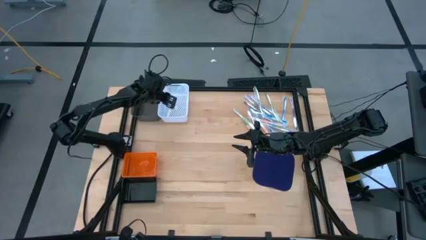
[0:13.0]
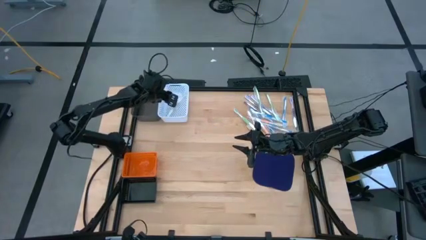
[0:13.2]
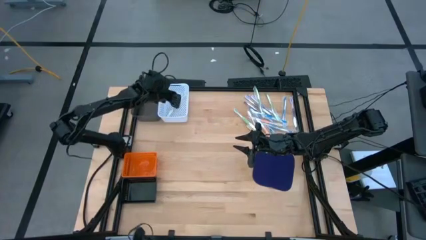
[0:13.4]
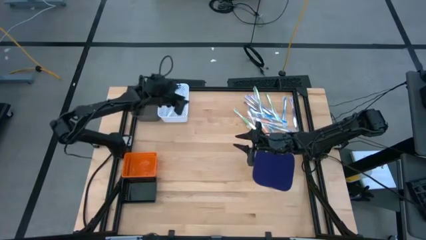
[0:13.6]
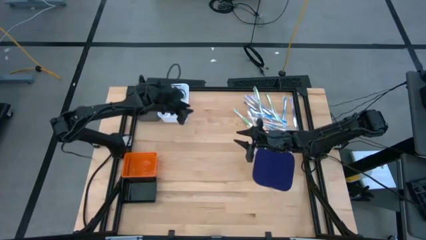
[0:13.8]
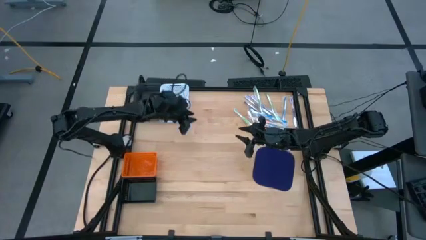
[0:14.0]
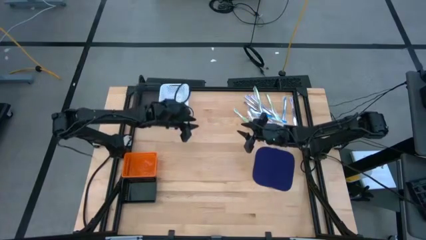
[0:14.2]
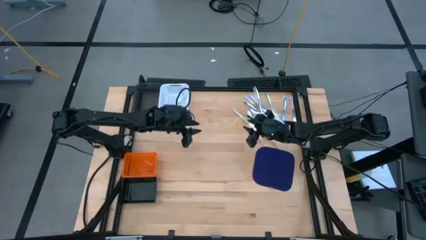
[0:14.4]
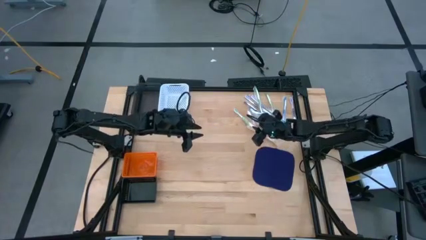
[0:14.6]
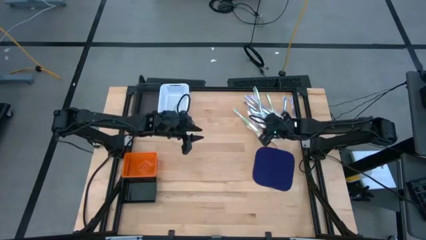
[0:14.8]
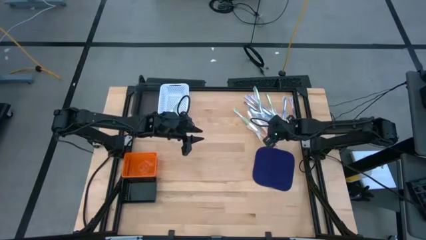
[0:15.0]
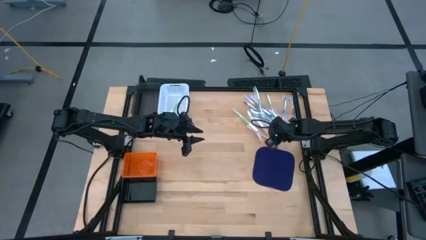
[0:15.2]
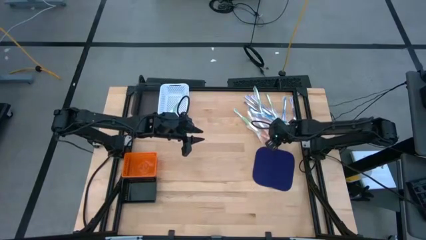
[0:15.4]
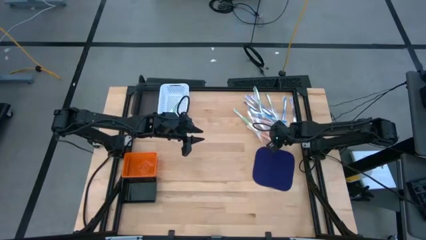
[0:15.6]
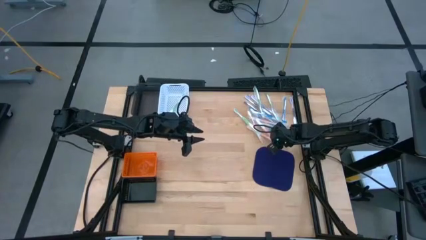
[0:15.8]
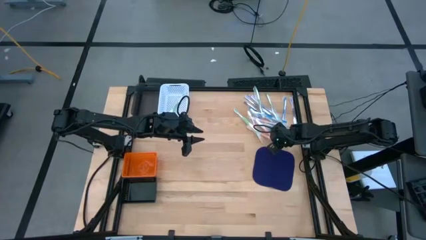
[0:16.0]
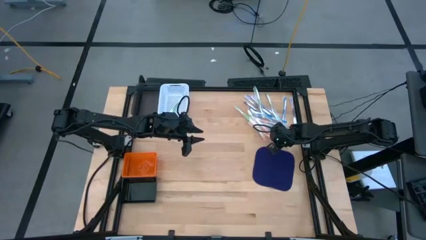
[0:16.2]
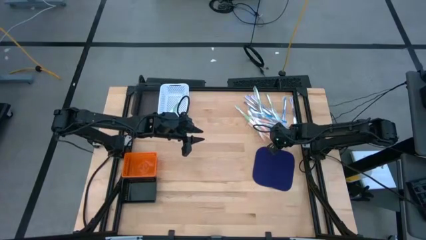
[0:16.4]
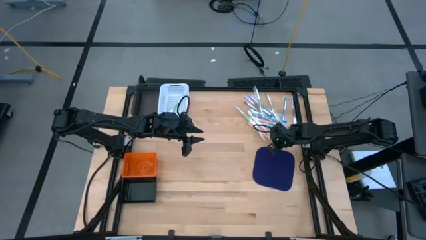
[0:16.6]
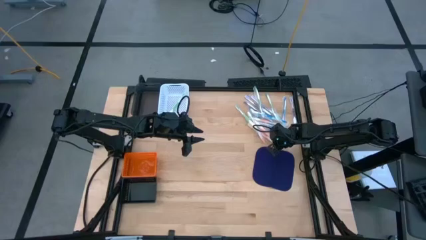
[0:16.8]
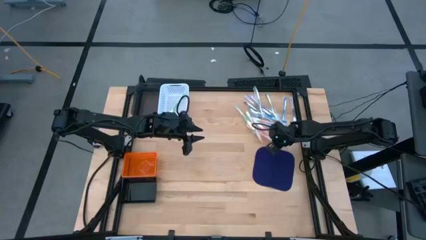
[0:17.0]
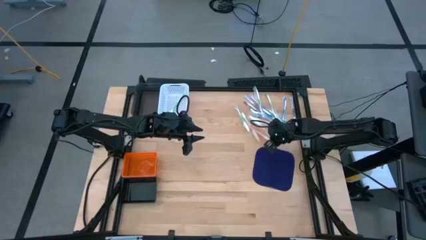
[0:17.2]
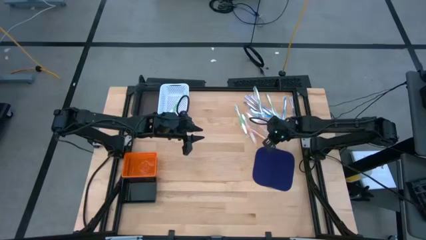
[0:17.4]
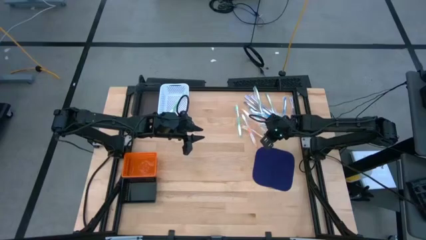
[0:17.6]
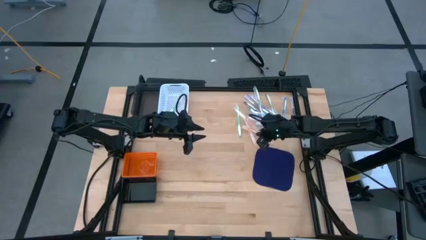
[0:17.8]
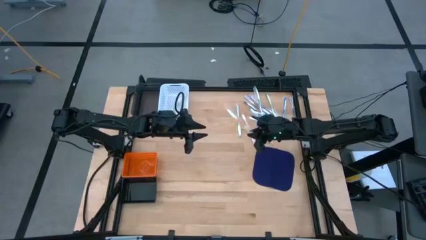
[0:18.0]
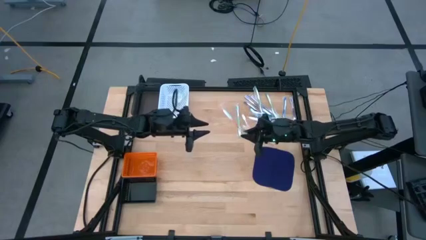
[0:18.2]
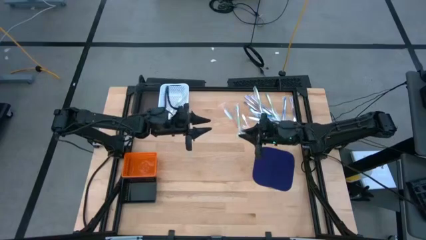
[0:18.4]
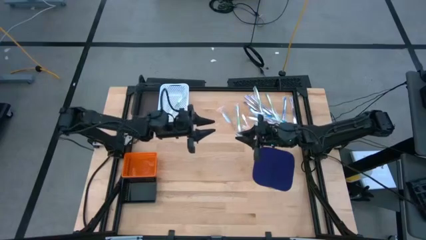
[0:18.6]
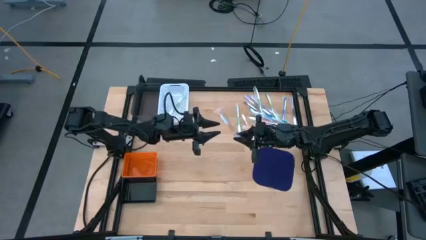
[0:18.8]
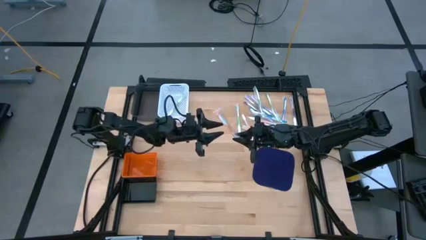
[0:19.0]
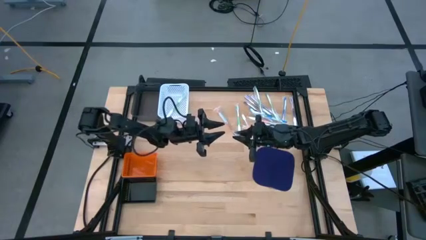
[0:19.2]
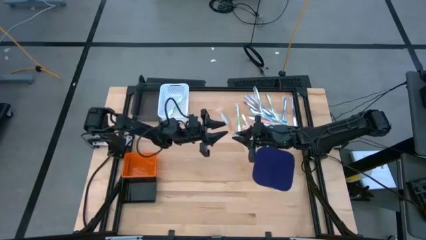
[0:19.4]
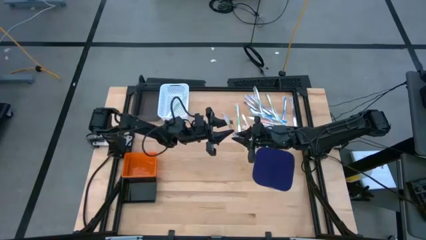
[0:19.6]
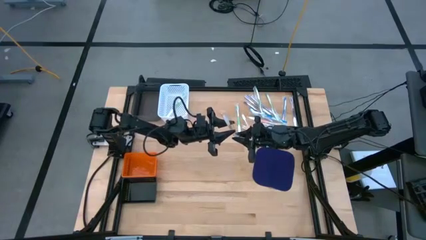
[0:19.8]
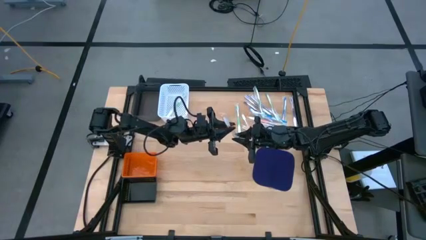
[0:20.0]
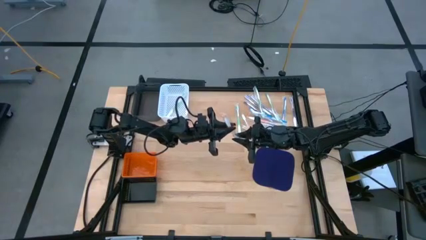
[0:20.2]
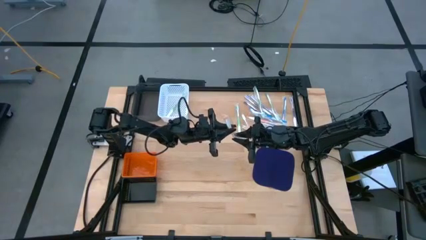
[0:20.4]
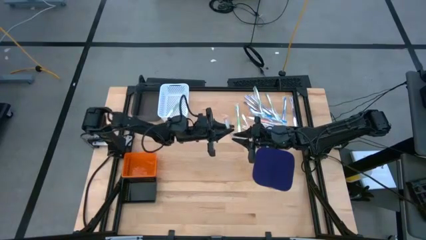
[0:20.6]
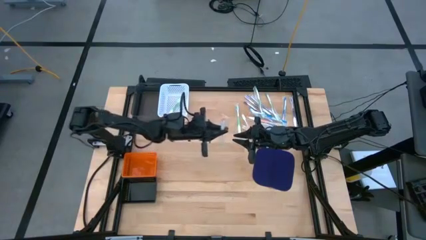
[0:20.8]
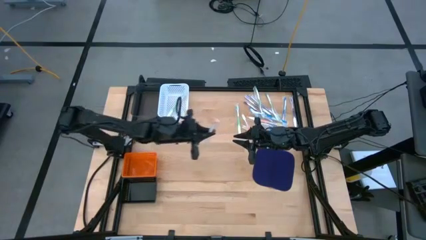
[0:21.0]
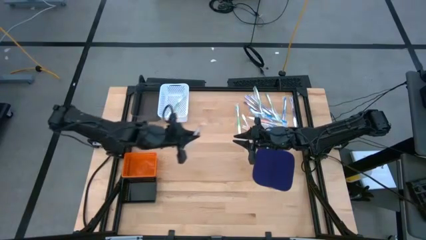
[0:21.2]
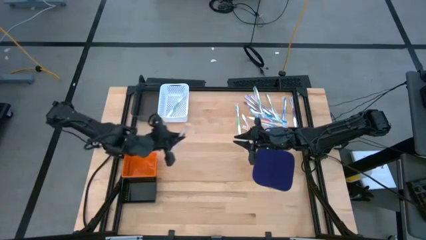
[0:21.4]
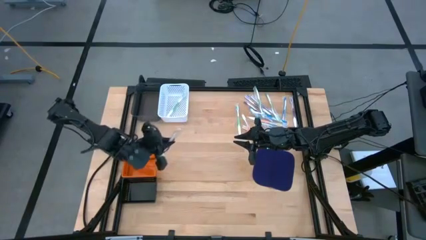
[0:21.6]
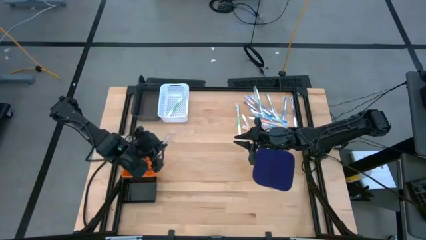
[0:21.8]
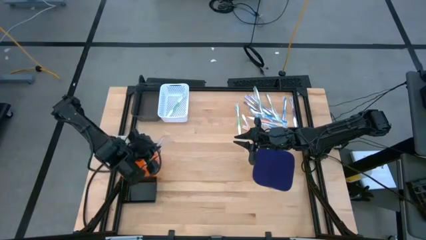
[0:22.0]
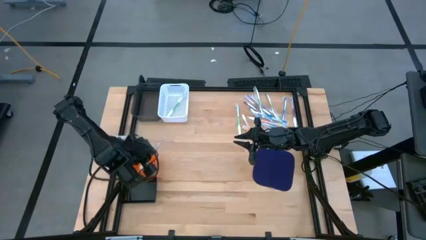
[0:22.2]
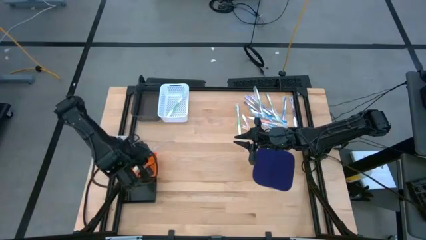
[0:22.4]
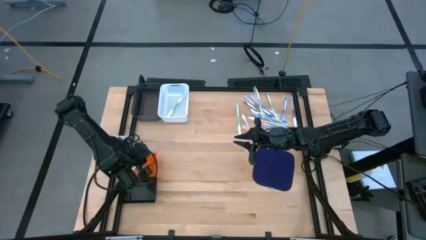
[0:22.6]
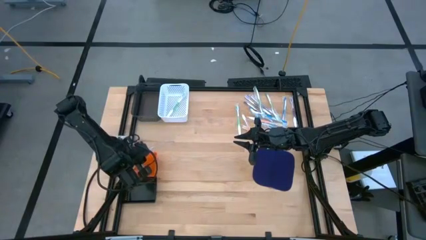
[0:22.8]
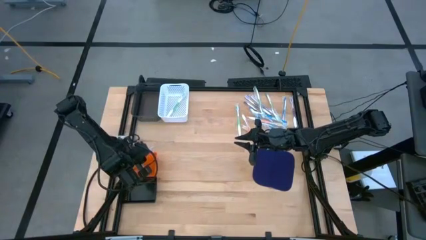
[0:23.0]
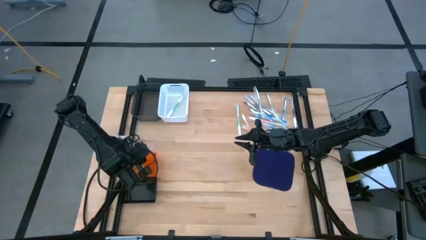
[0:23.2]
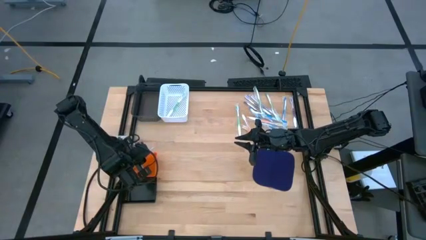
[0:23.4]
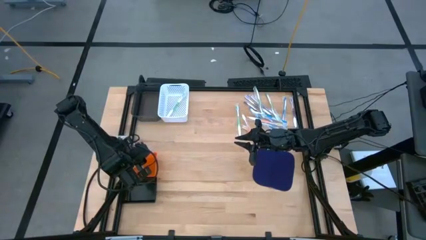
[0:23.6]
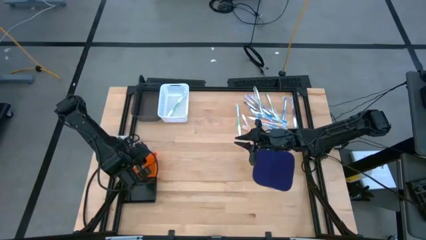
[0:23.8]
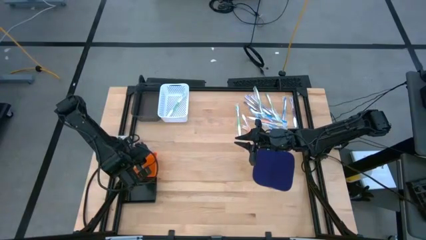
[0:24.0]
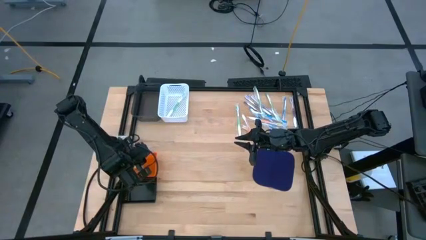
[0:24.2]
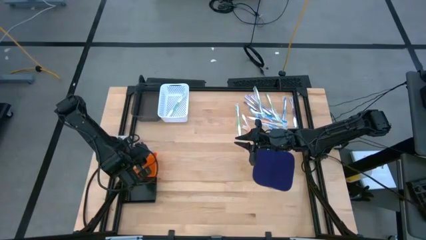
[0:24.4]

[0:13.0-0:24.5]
Task: Pick & Place Toothbrushes
Put the orange toothbrush into the orange bin

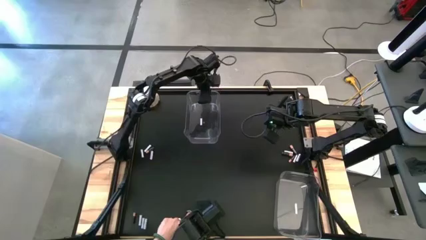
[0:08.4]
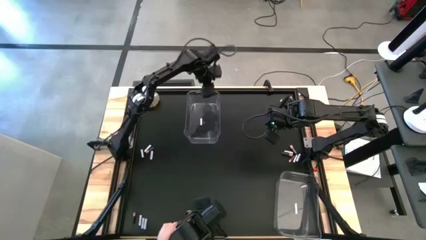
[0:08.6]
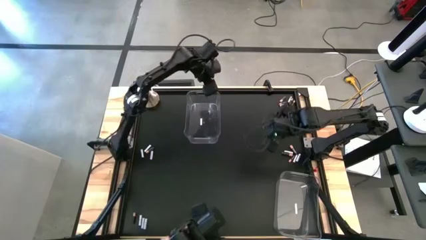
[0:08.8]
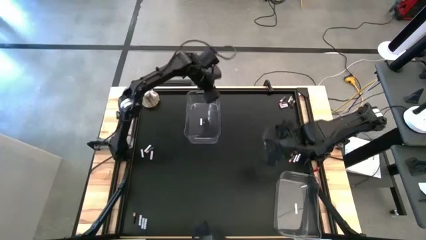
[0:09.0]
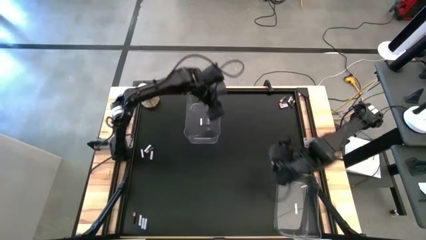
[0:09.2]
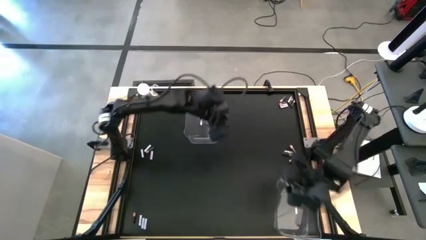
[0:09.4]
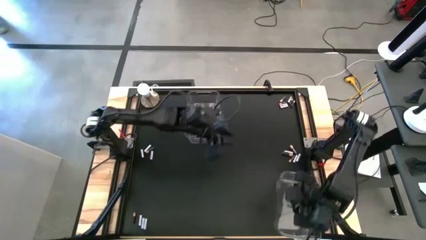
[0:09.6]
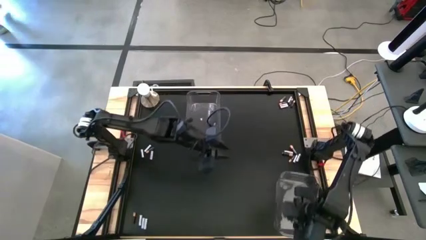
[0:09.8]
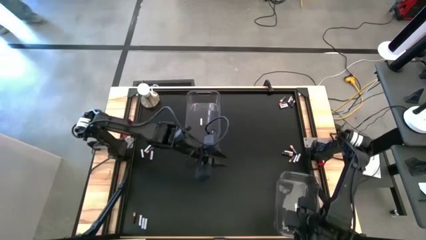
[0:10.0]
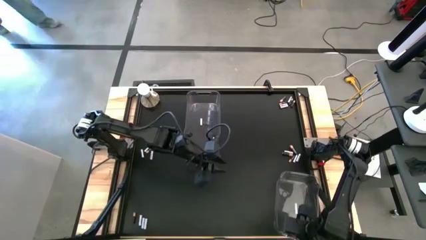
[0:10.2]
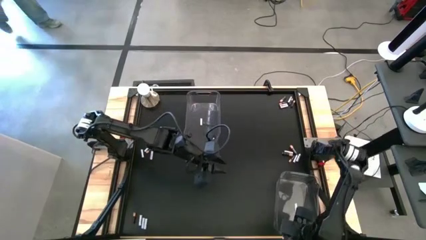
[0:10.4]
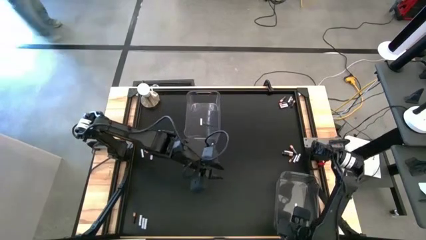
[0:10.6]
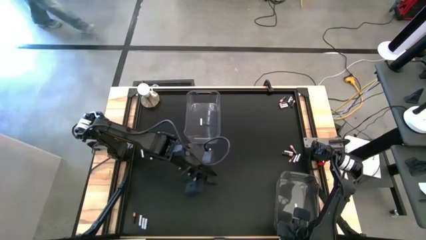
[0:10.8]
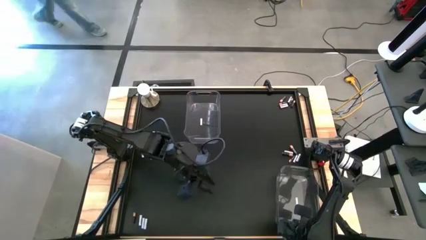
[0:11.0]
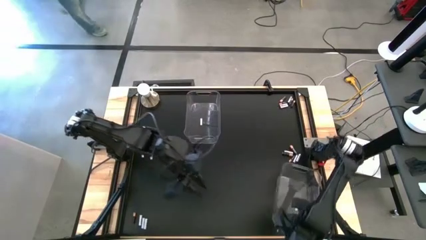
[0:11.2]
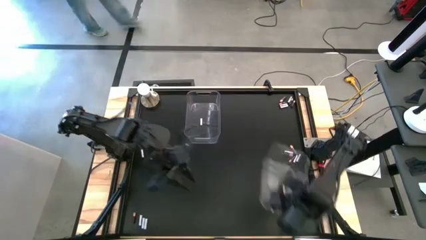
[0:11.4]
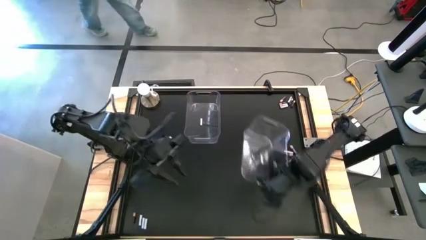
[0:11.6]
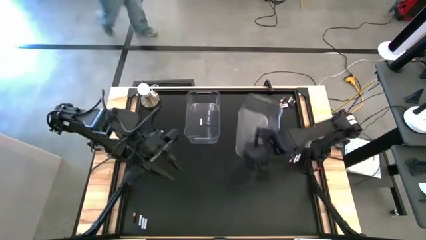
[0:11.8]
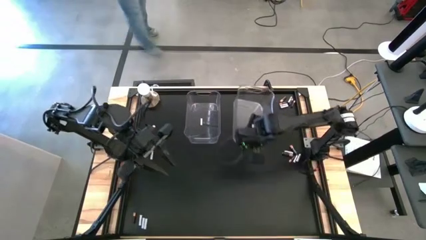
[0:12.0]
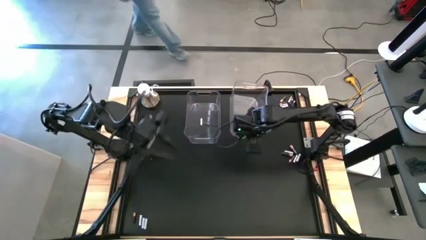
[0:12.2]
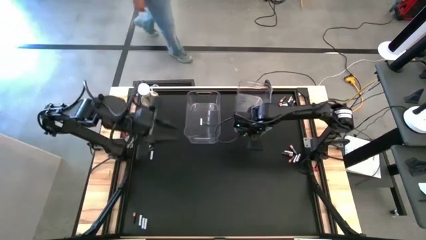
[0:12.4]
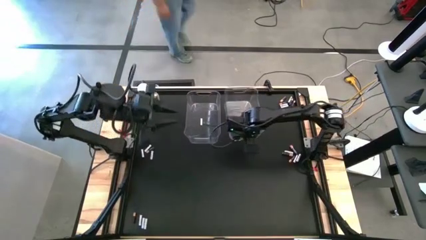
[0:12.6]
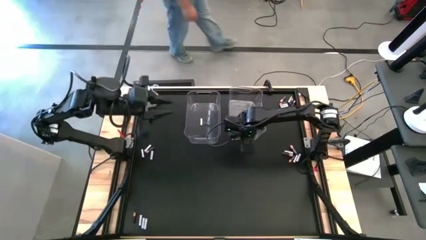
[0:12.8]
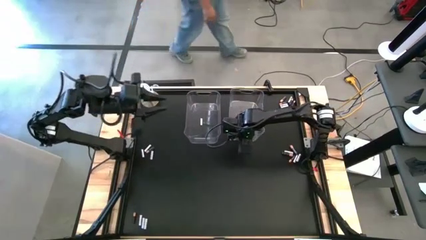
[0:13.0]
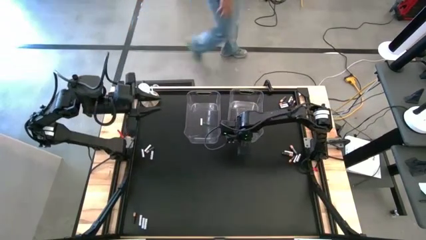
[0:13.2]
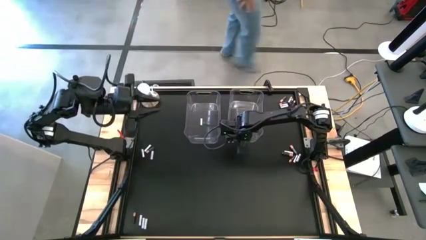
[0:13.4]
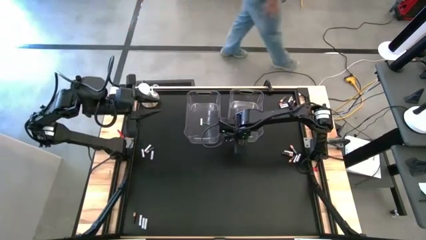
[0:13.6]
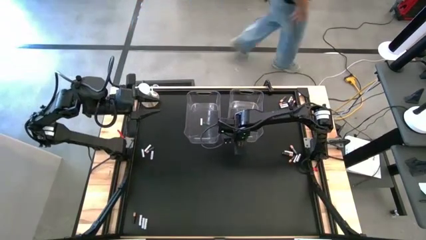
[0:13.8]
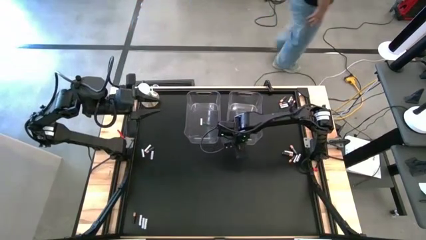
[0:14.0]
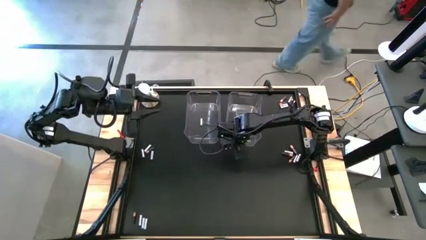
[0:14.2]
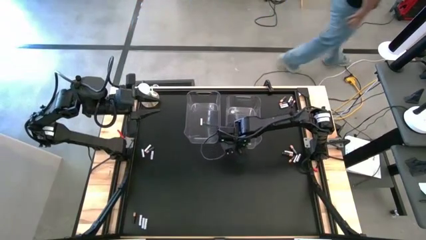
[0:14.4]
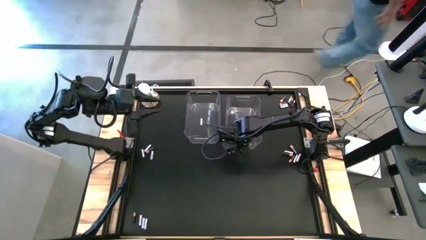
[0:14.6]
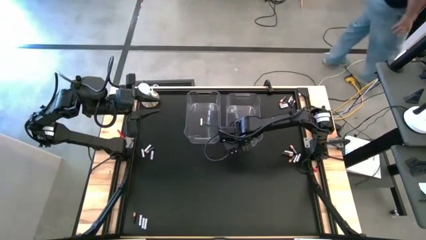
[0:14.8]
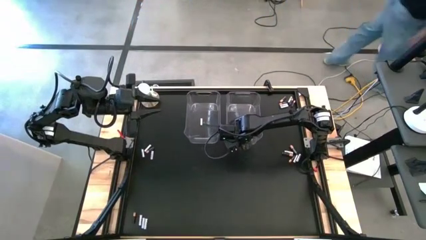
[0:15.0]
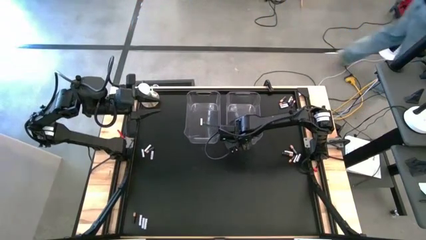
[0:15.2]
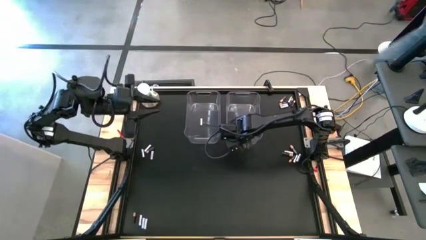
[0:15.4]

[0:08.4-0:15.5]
Task: Sort batteries
Move the bottom transparent bin to the top of the table
